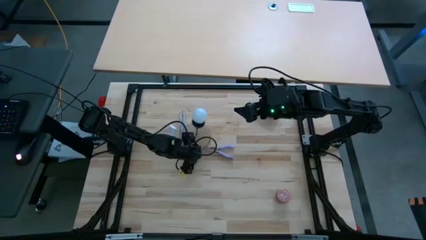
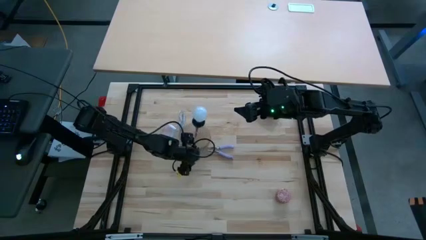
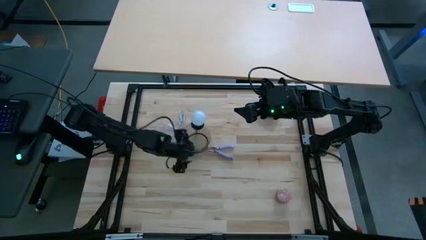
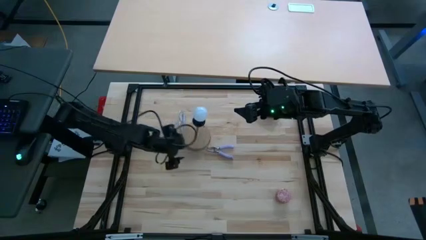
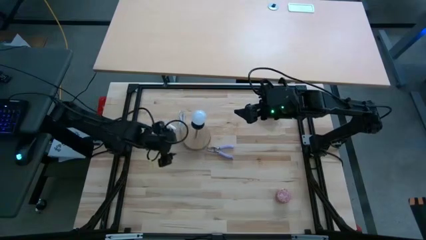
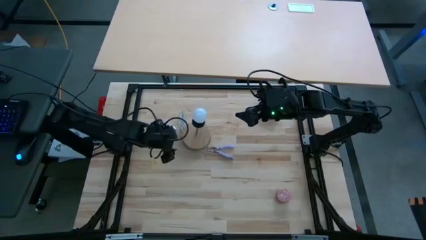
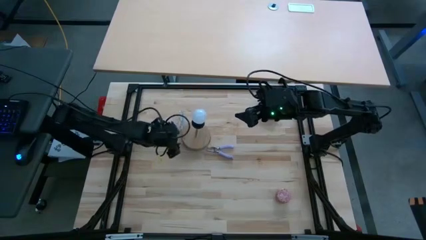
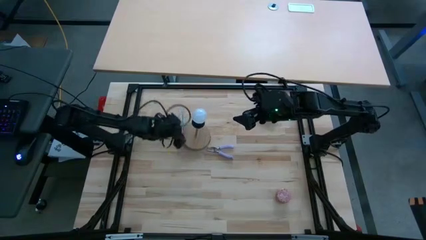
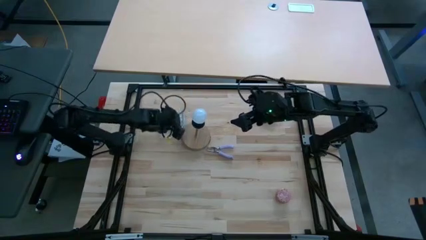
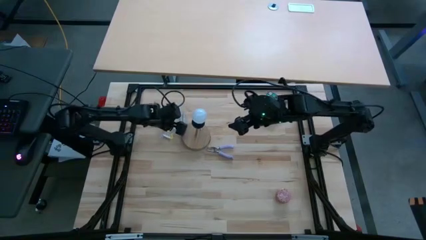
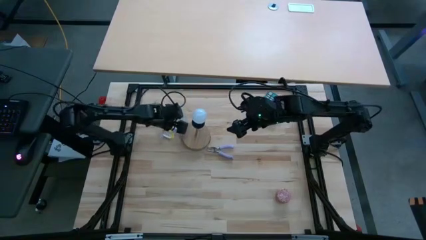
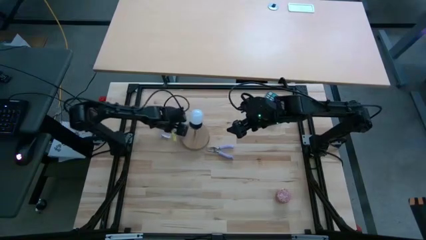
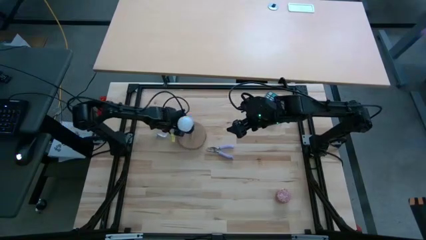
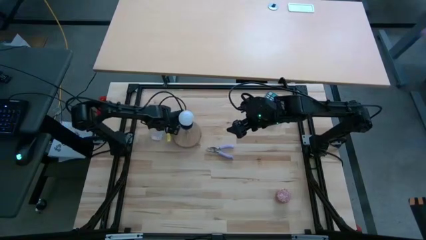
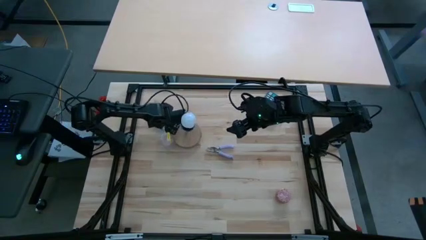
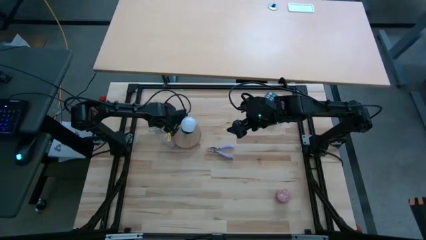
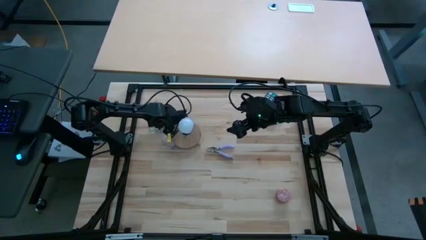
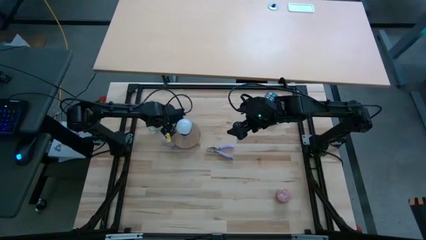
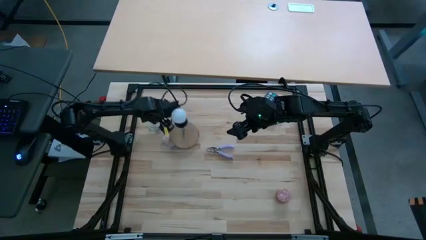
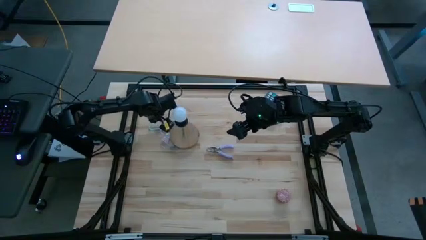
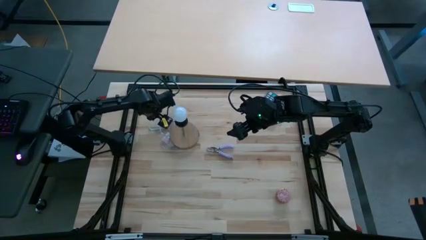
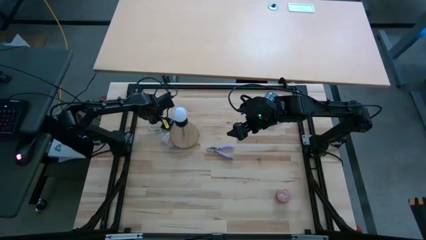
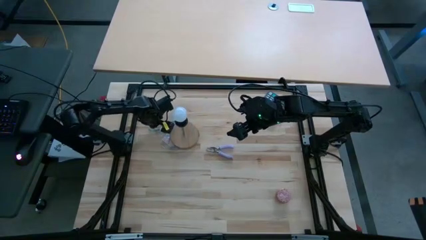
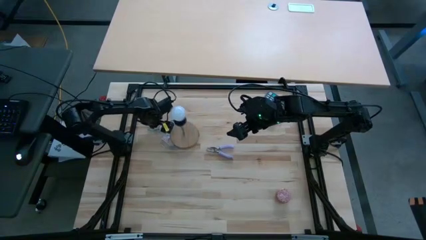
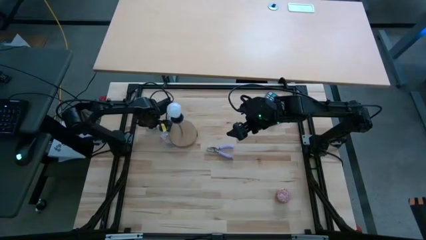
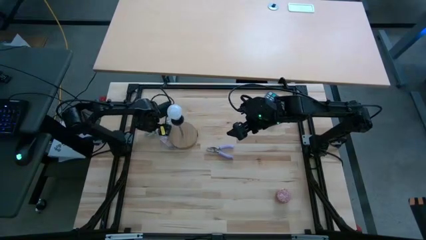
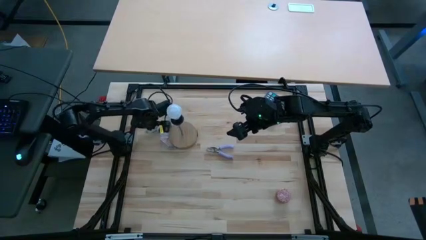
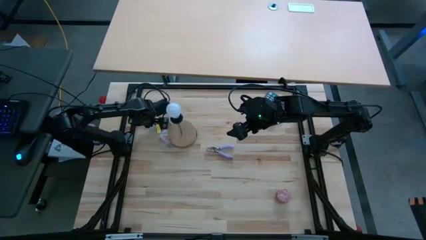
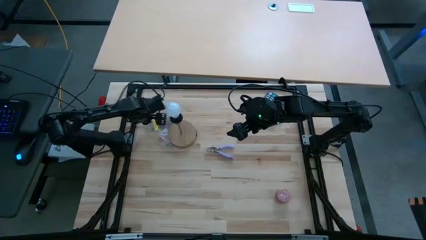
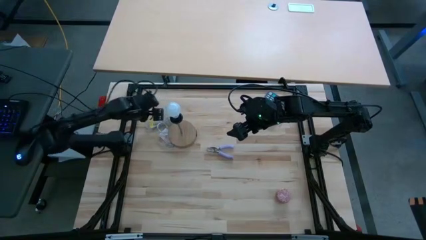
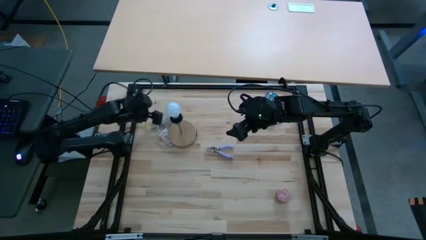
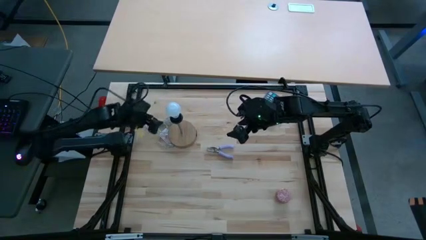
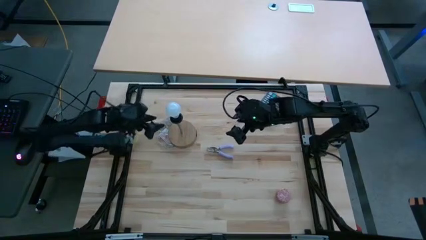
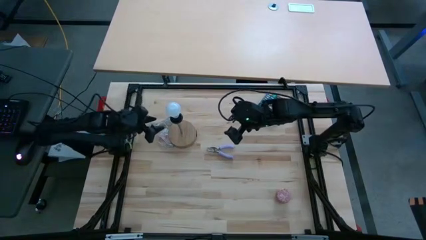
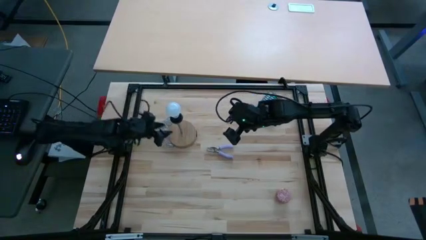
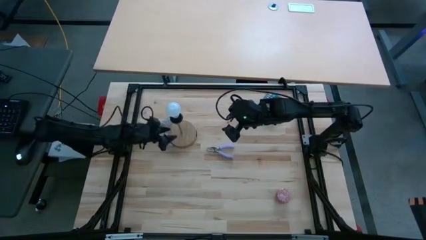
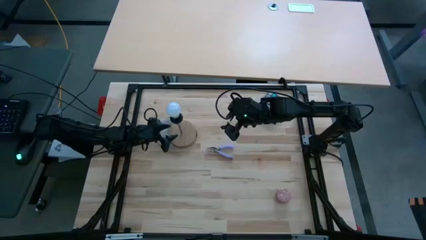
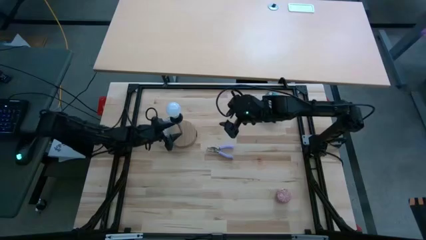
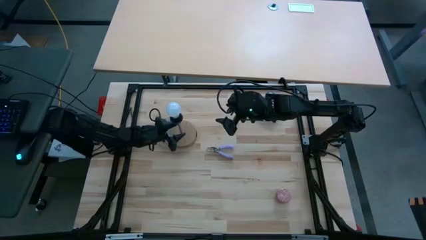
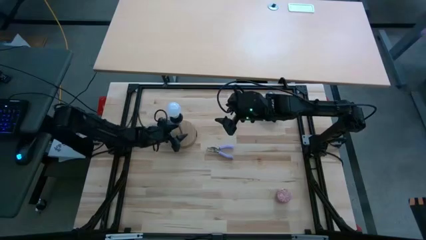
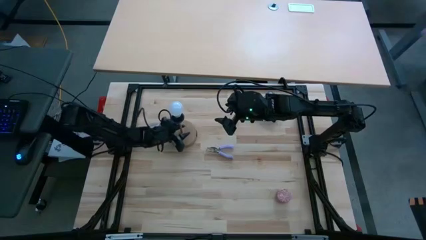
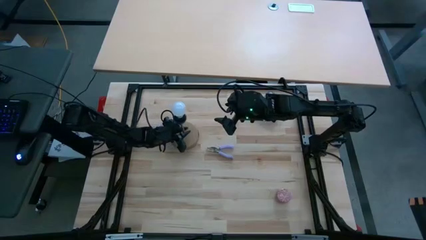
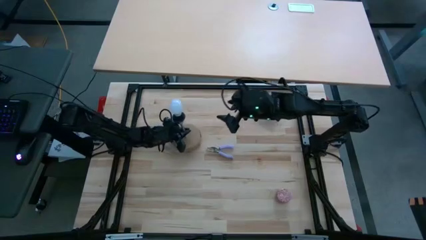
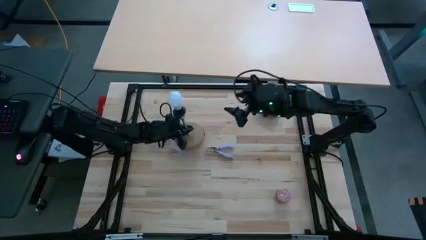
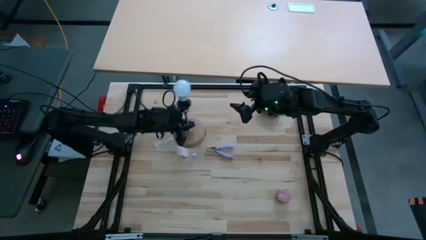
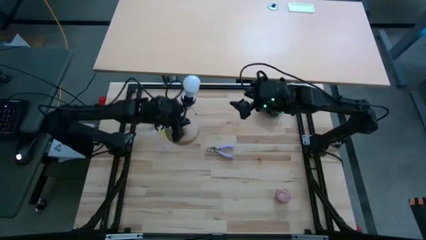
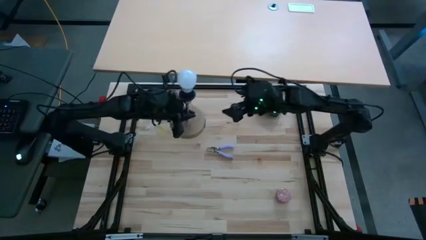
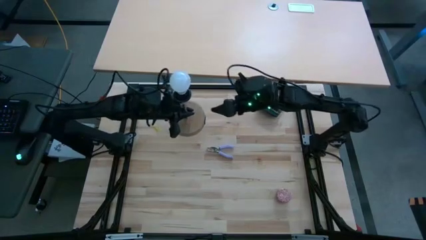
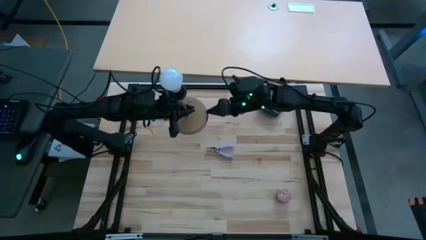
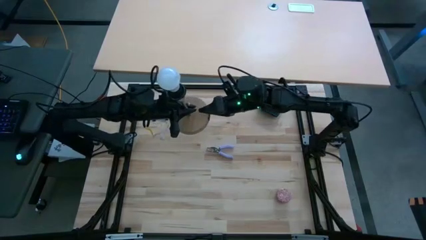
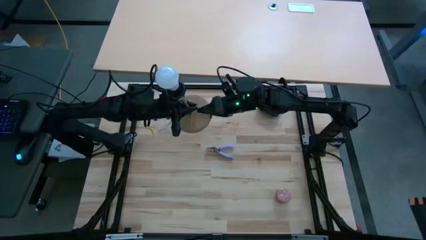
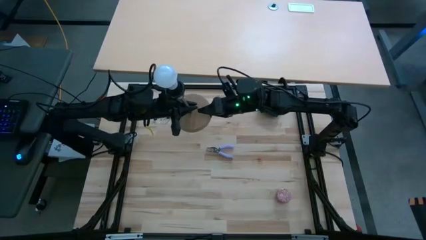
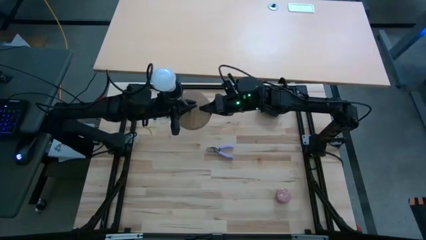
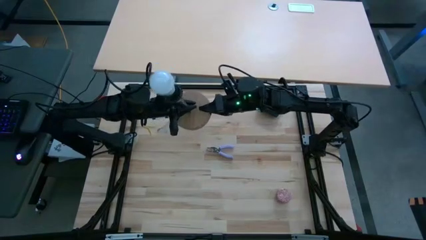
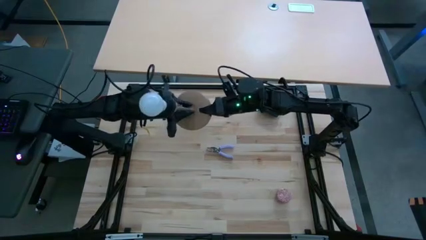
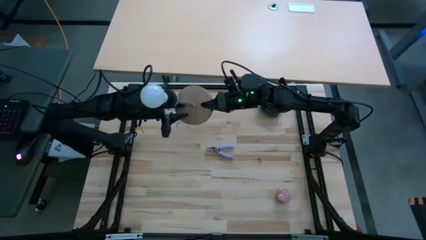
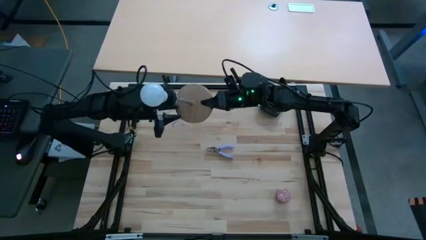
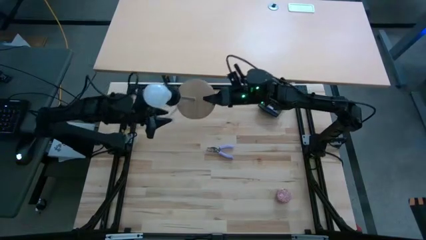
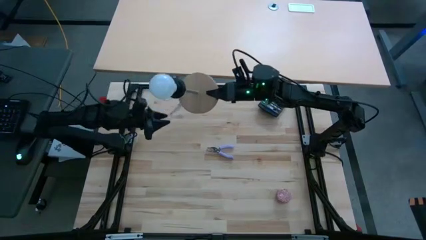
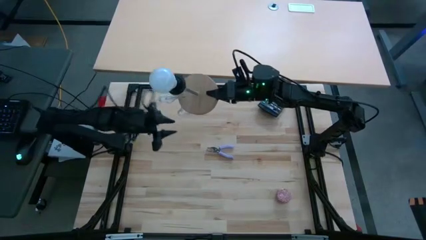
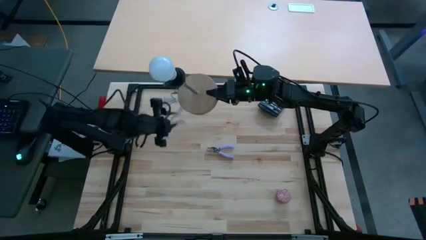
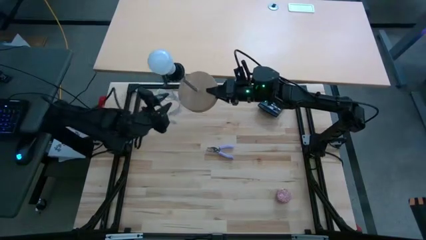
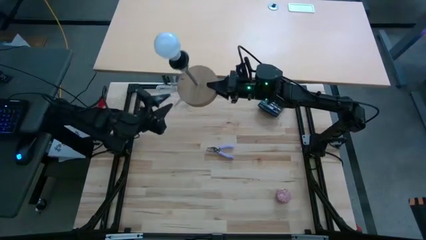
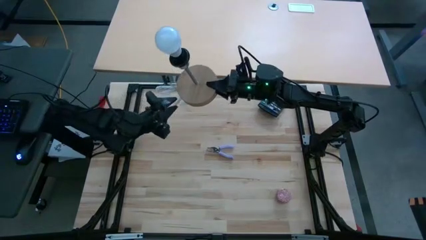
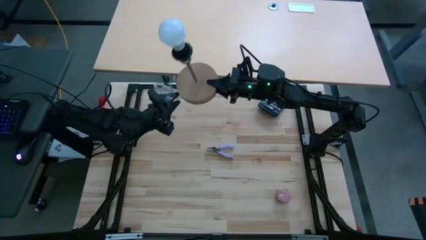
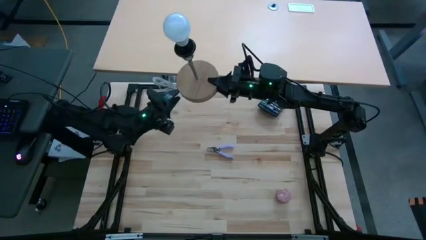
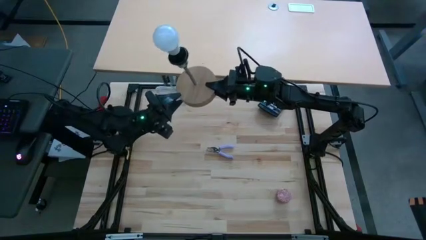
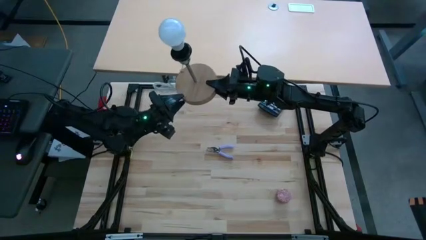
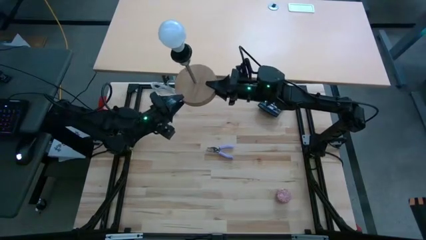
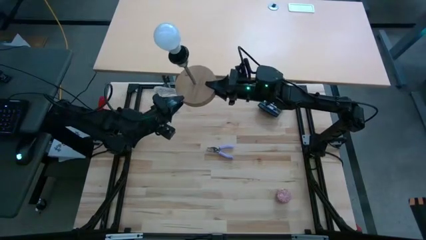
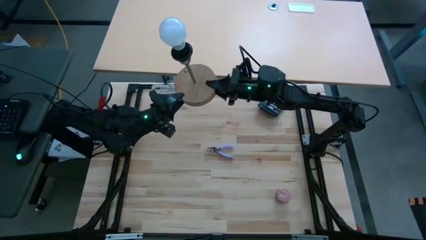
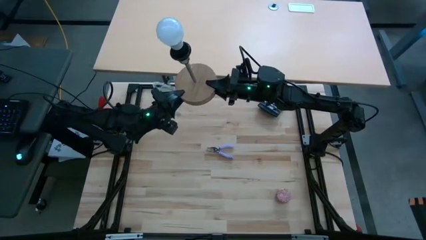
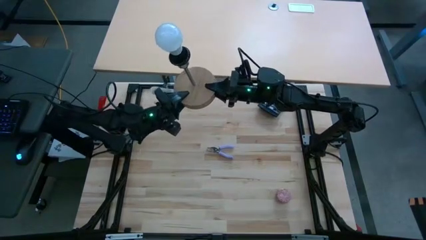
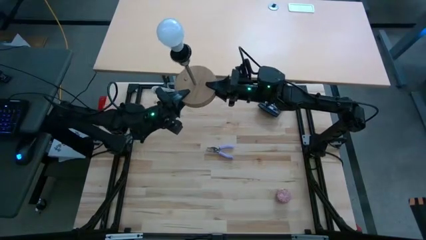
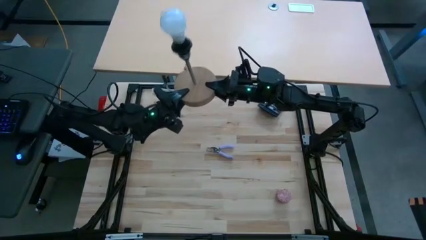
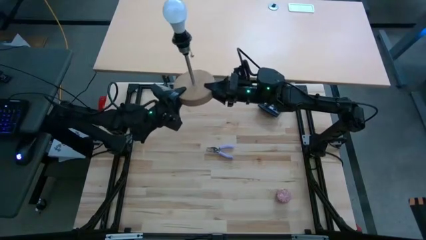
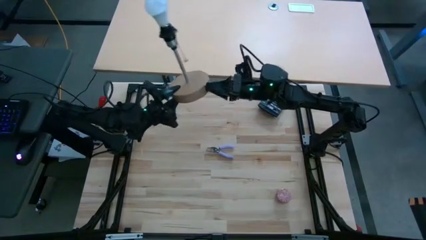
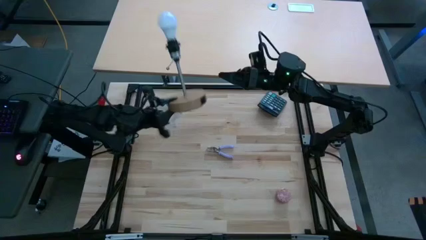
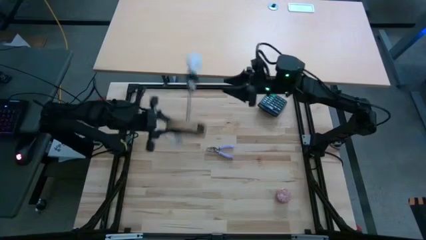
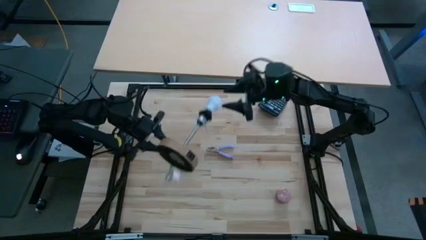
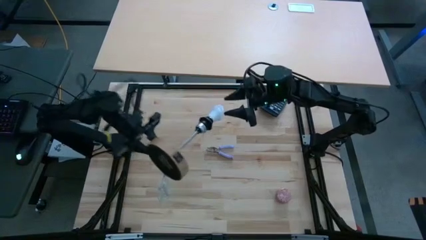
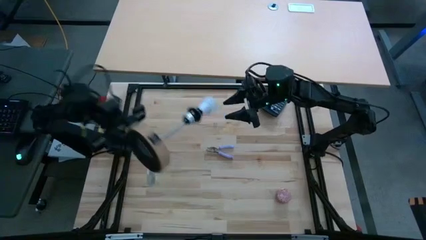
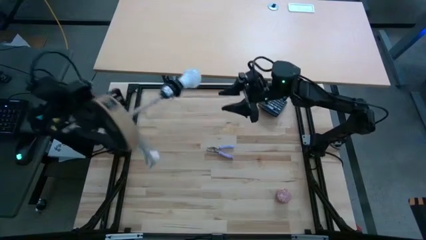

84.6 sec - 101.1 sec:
Task: Screw lightbulb
Remove the light bulb from the lamp socket
